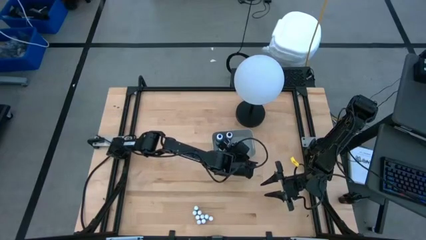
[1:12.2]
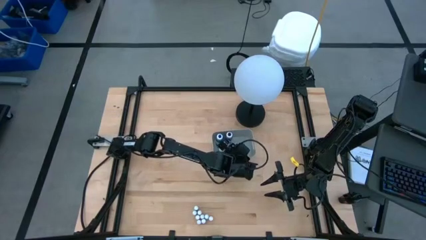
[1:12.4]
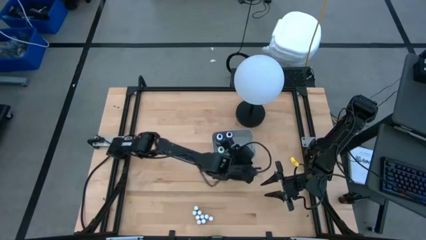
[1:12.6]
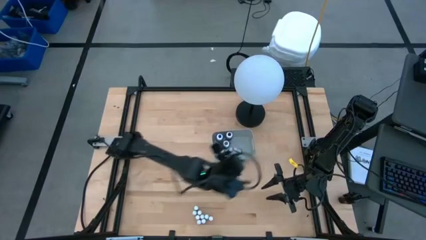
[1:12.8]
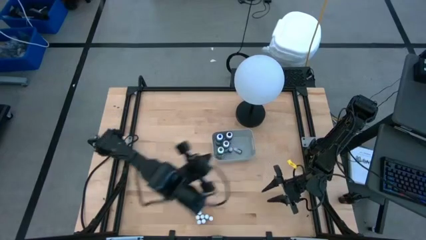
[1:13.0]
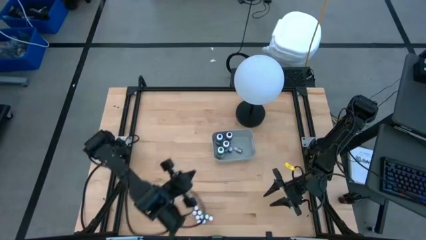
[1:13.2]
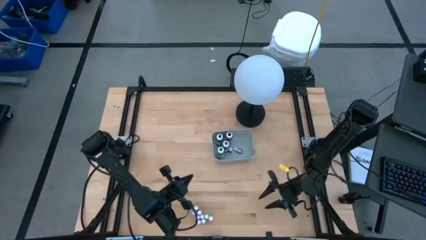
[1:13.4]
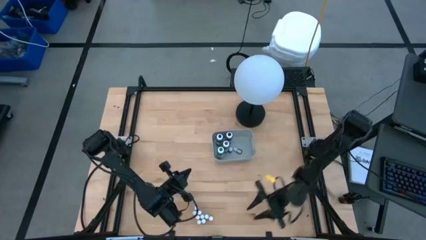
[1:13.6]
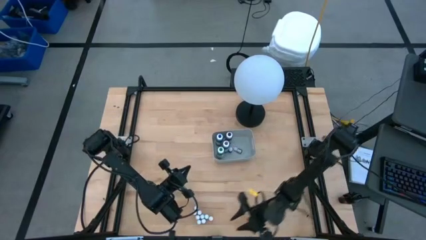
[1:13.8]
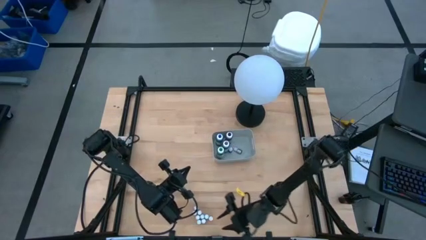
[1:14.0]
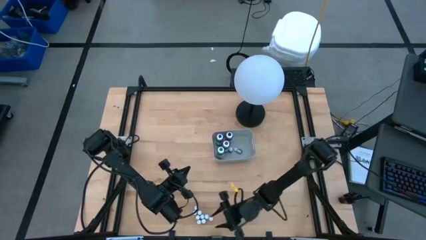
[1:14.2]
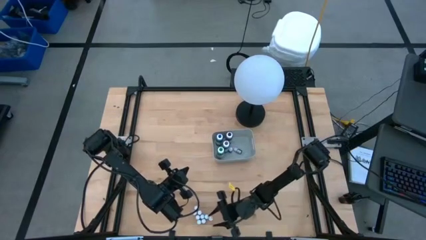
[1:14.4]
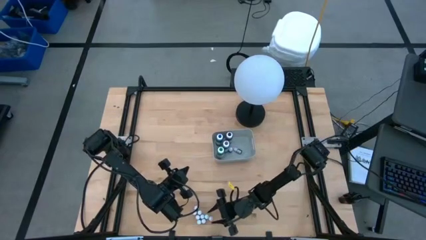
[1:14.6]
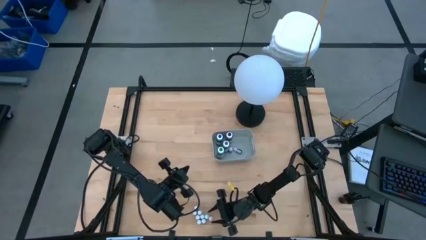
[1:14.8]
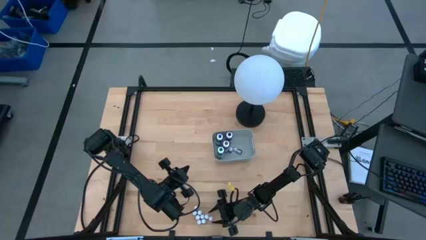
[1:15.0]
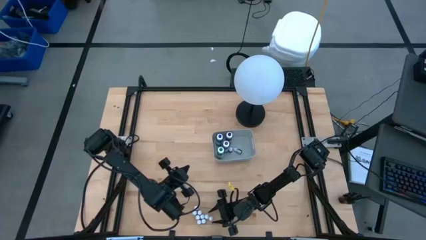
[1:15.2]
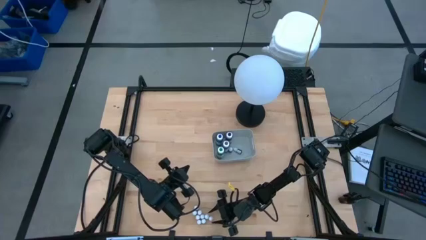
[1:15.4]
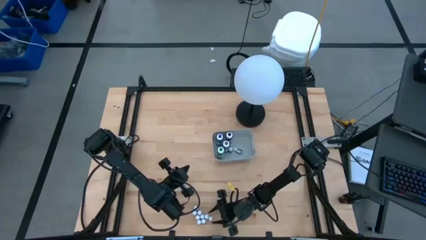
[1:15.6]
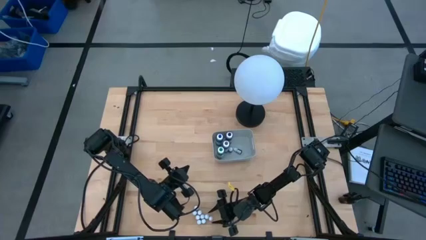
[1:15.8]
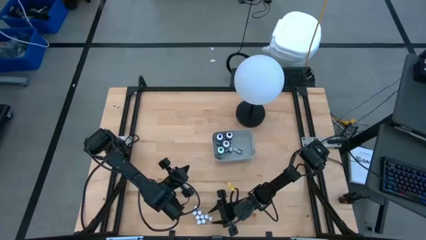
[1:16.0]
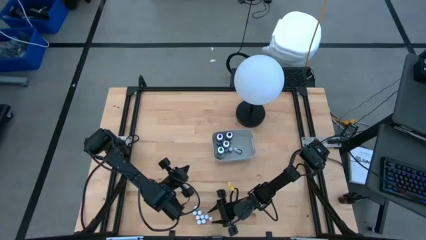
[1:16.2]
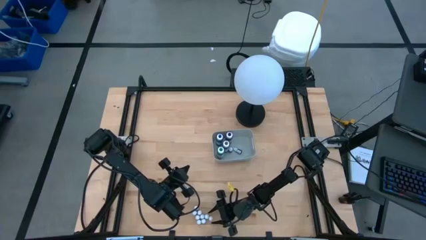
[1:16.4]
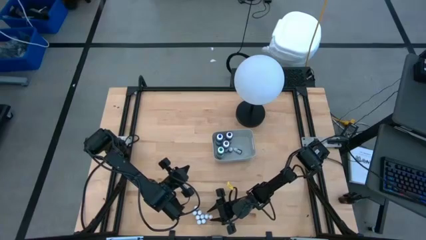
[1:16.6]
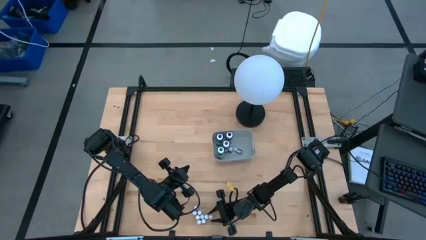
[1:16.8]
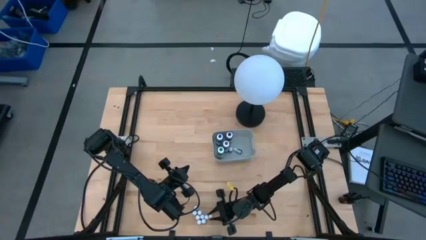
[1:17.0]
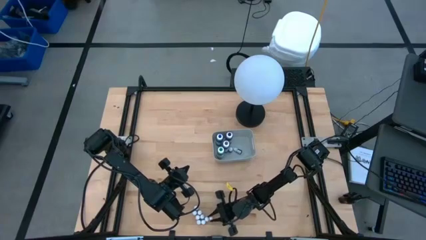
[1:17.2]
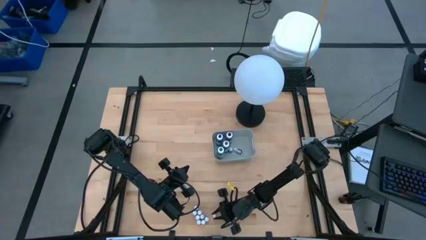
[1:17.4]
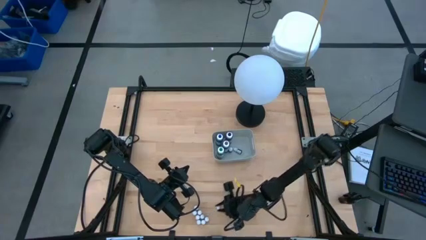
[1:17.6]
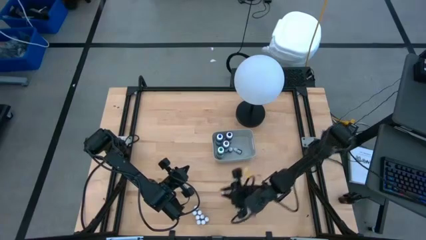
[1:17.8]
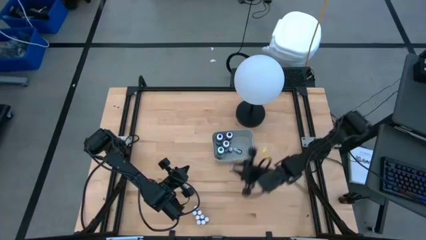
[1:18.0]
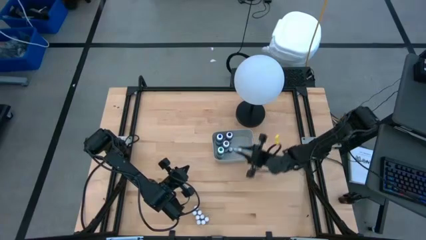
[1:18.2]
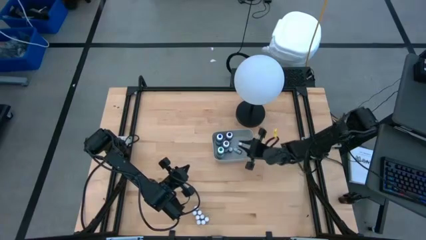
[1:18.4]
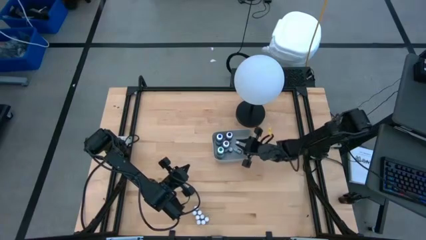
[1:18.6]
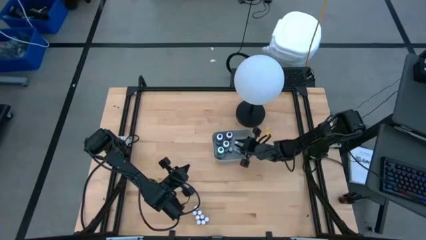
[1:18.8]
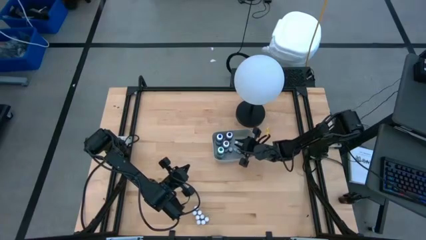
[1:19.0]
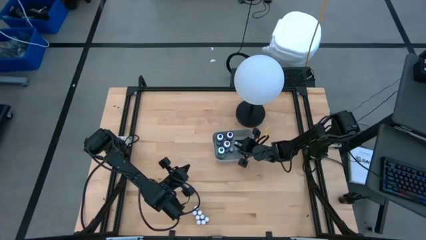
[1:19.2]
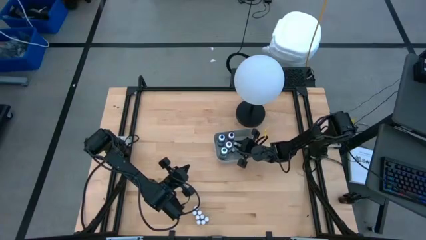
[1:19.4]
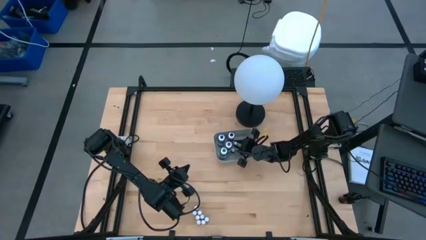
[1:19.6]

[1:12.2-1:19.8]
Task: Pick & Place food coloring
Put the orange food coloring bottle into the gray bin

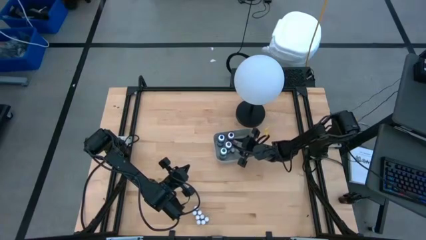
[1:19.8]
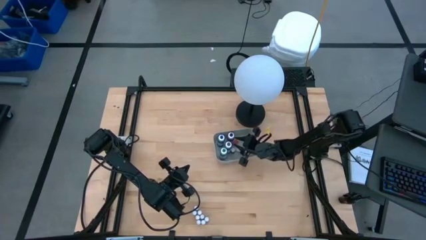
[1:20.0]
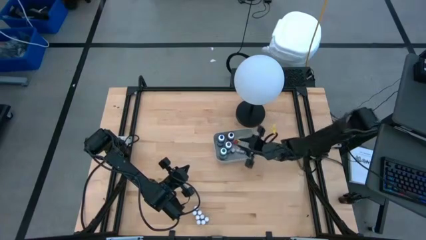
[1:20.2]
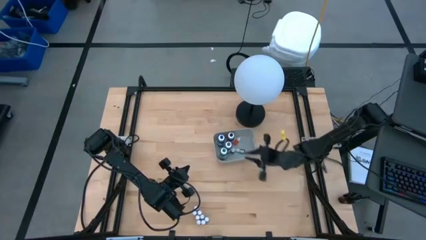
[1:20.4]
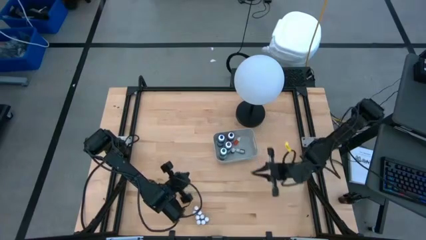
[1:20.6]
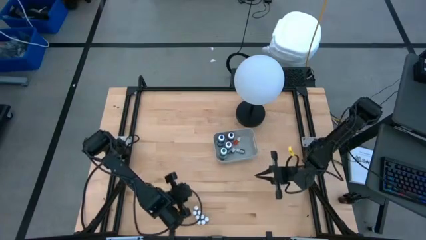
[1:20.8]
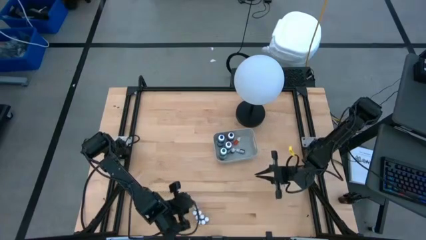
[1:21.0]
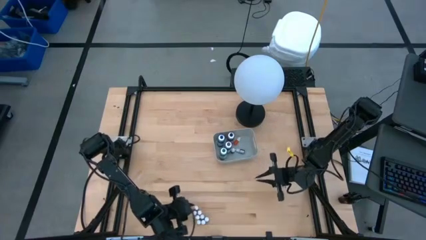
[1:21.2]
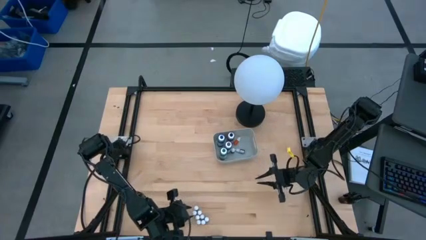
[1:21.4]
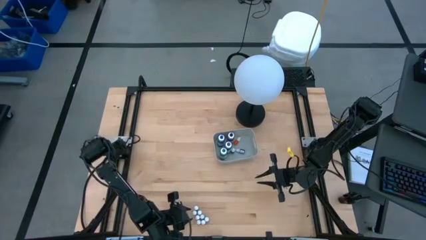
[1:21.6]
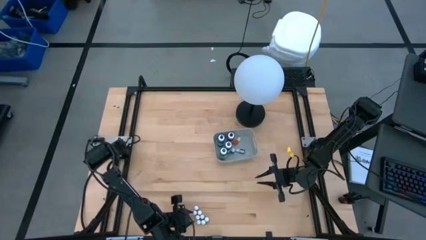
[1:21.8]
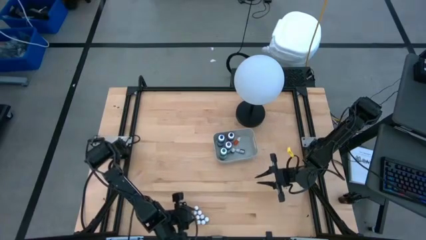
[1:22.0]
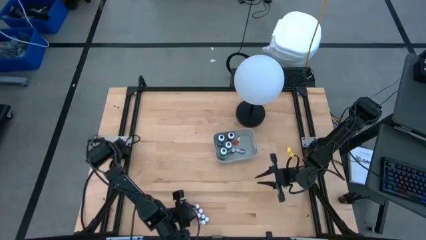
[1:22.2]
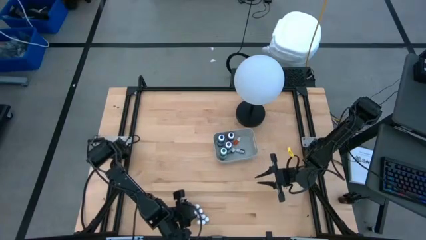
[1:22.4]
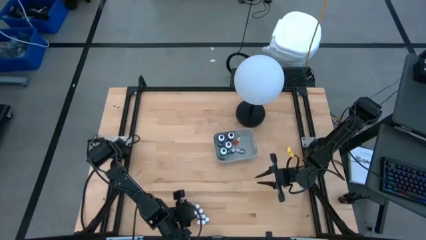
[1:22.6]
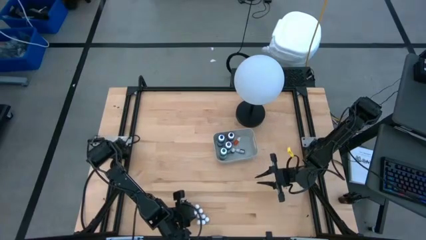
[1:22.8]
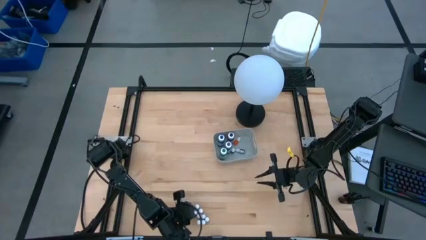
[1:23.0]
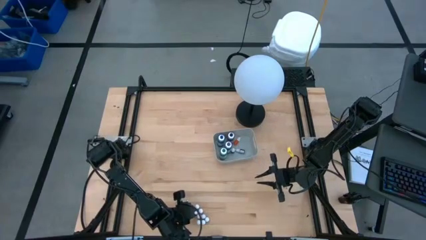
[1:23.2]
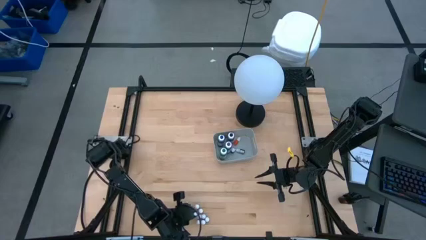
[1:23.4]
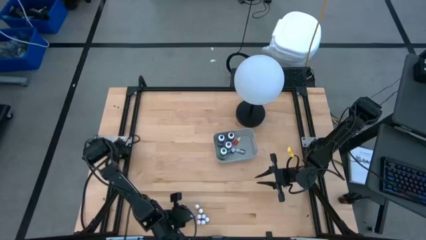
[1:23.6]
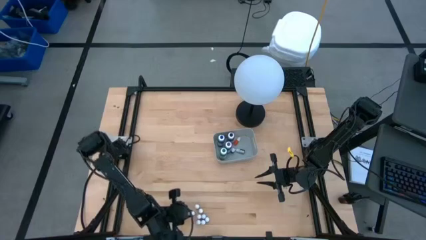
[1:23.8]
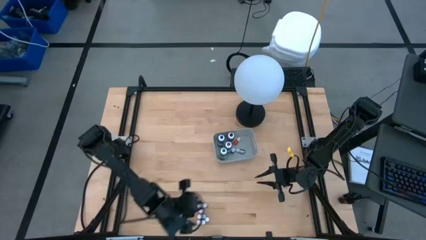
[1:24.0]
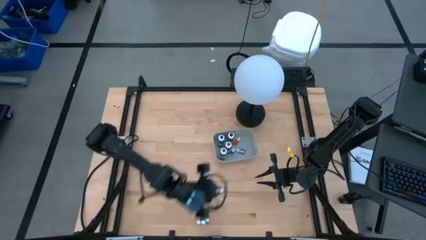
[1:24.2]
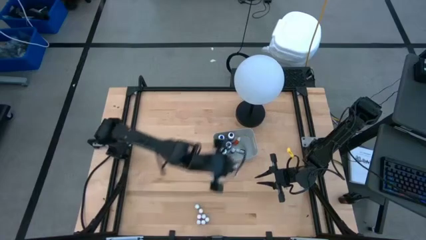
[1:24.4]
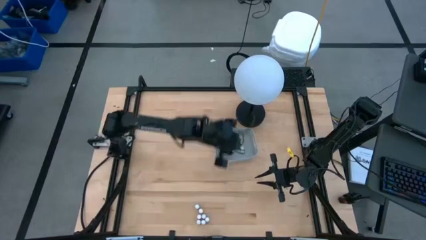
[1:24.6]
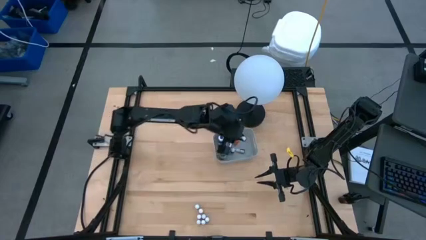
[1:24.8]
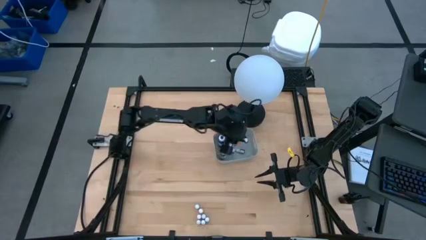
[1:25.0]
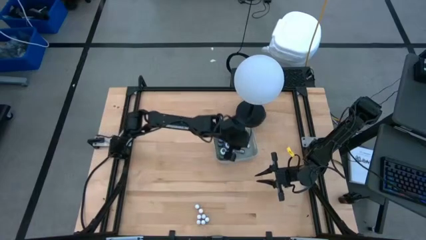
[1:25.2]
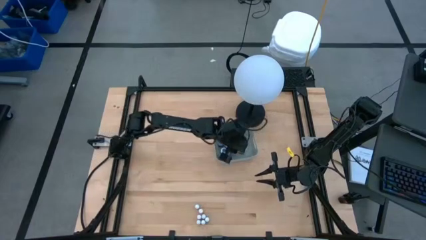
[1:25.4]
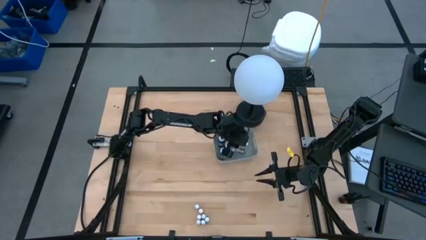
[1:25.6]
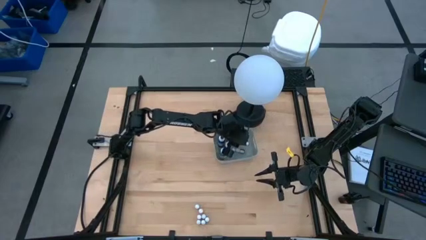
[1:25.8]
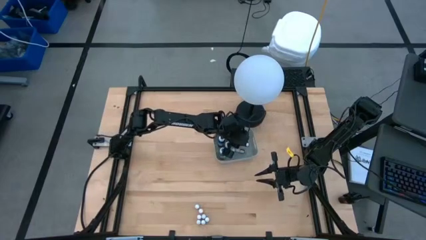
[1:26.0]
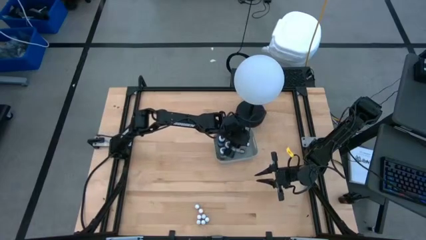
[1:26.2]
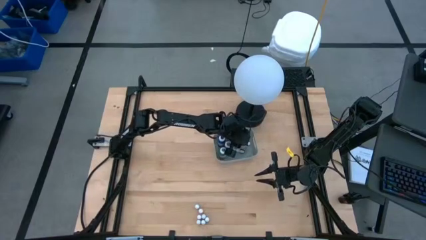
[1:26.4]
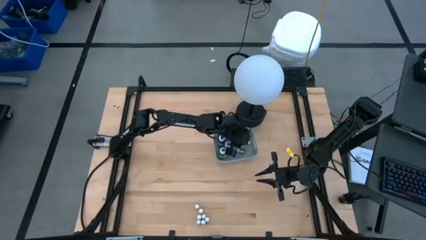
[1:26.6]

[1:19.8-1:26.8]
Put the purple food coloring bottle into the gray bin
